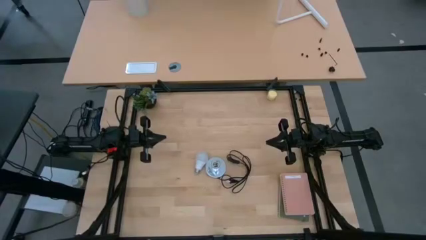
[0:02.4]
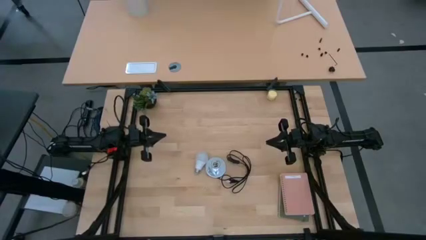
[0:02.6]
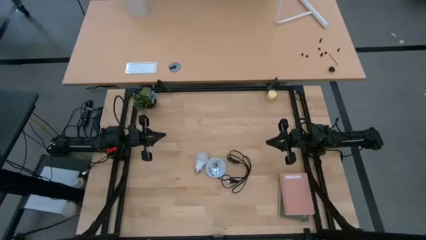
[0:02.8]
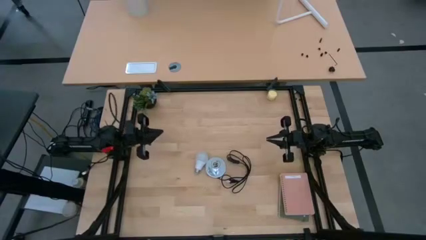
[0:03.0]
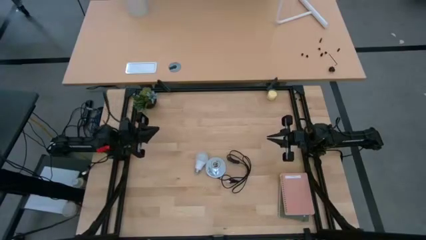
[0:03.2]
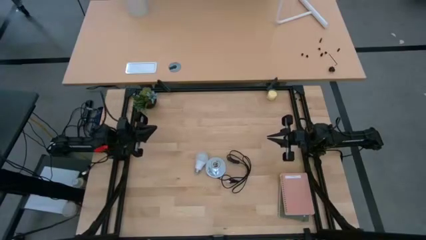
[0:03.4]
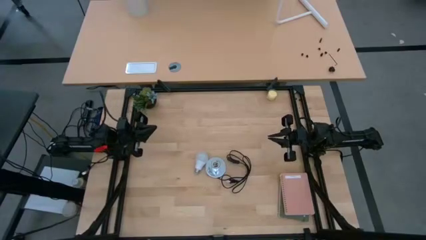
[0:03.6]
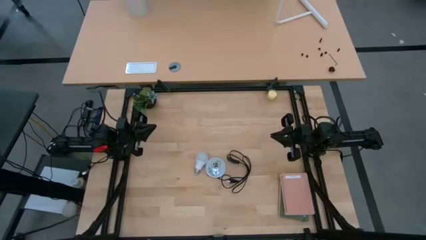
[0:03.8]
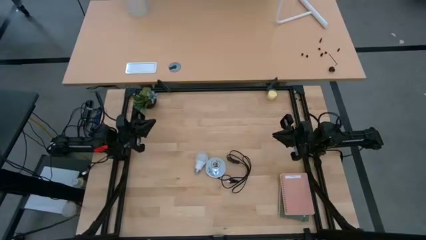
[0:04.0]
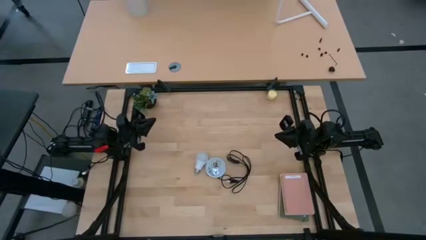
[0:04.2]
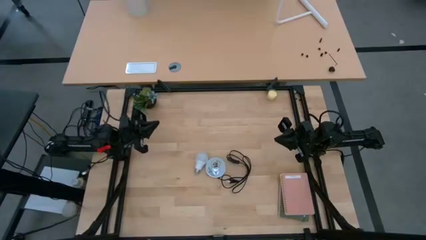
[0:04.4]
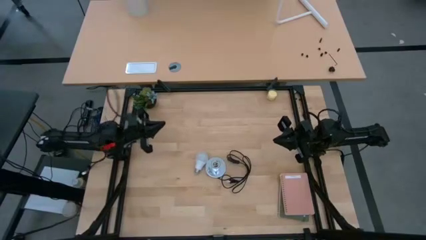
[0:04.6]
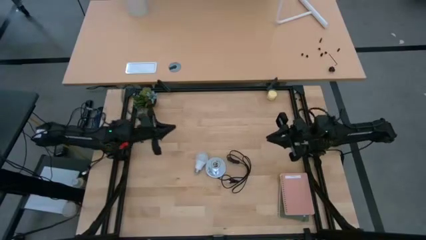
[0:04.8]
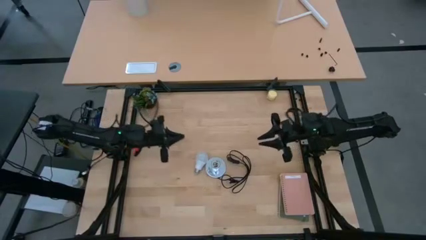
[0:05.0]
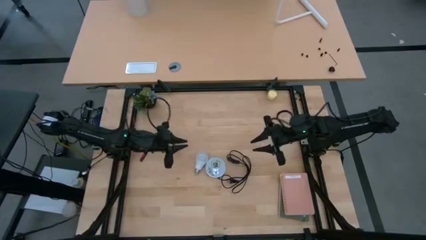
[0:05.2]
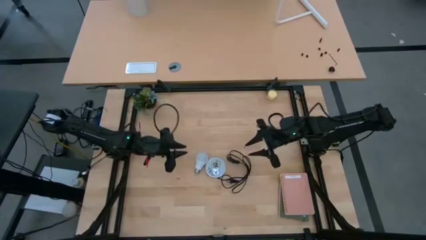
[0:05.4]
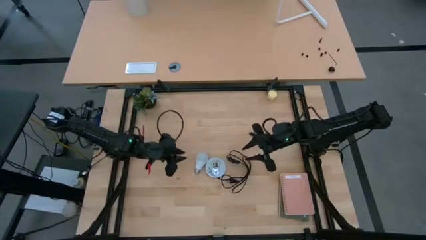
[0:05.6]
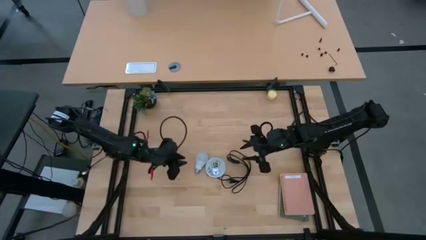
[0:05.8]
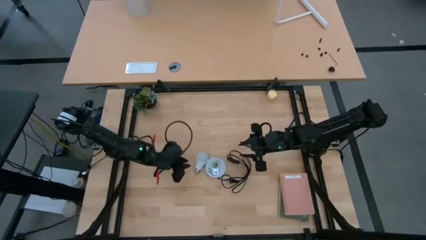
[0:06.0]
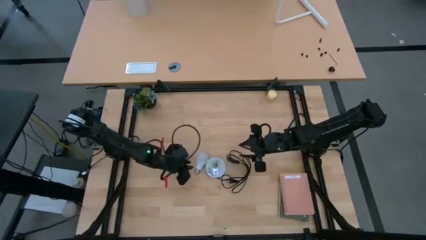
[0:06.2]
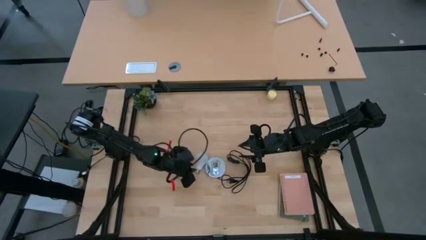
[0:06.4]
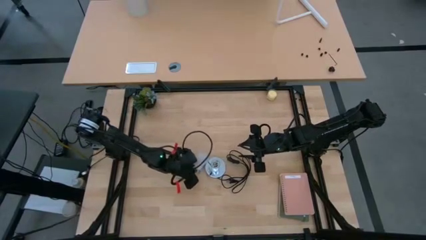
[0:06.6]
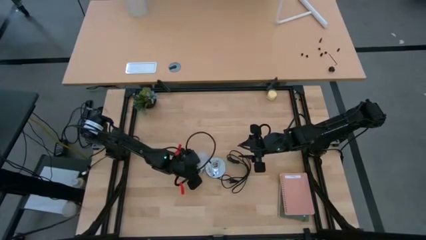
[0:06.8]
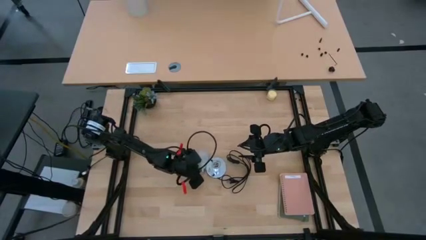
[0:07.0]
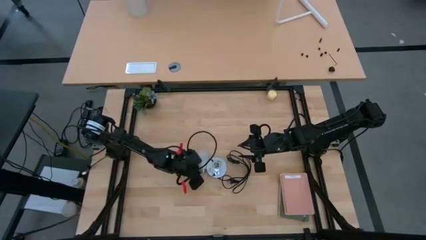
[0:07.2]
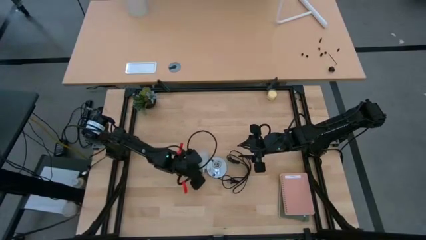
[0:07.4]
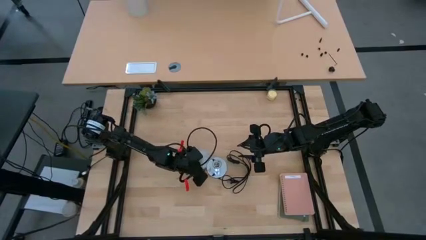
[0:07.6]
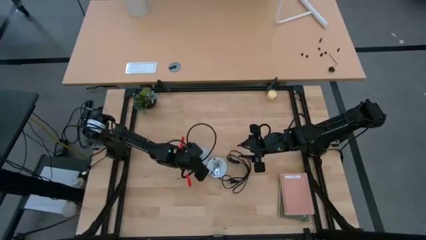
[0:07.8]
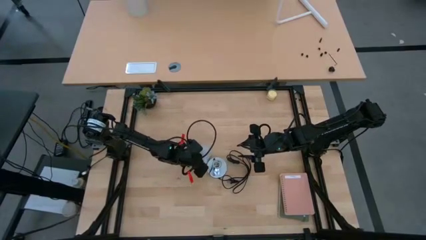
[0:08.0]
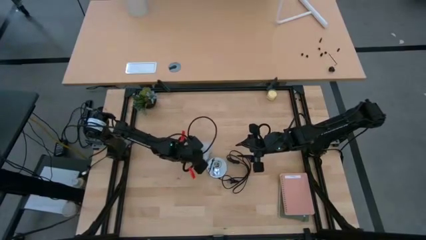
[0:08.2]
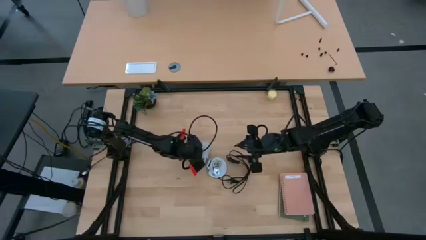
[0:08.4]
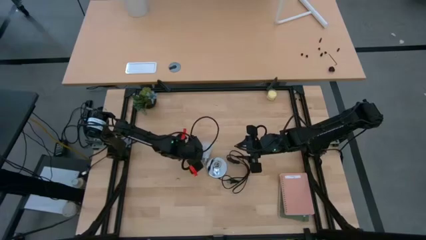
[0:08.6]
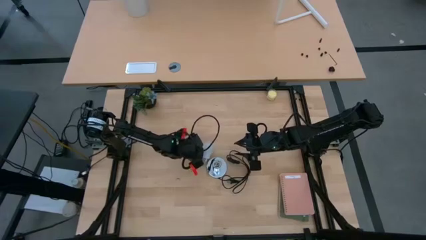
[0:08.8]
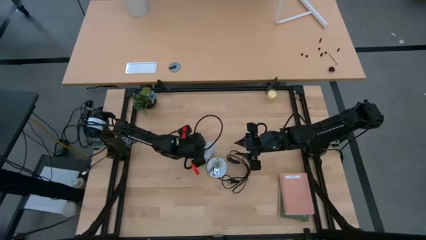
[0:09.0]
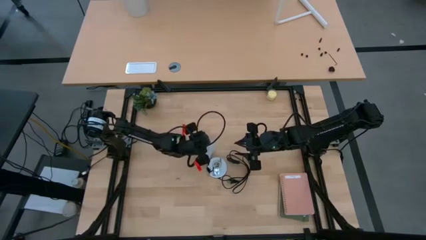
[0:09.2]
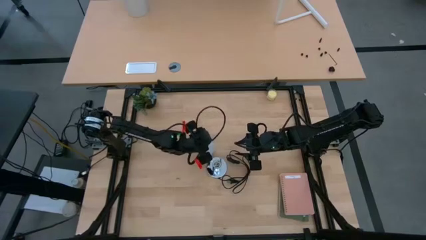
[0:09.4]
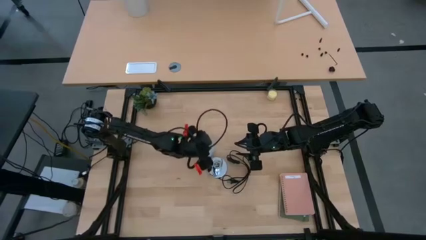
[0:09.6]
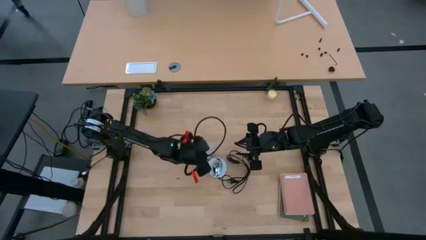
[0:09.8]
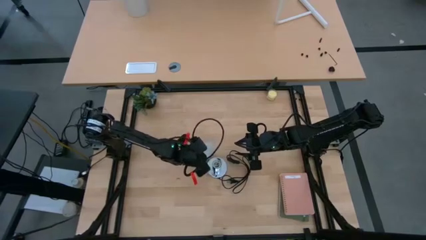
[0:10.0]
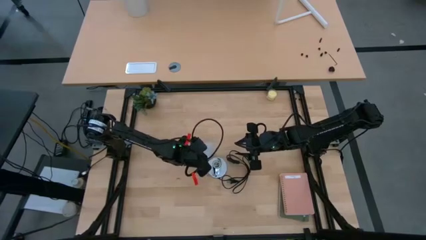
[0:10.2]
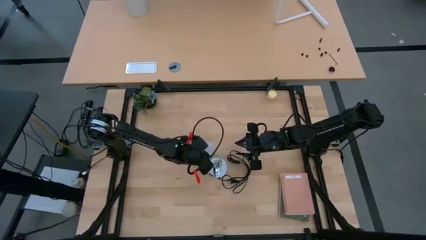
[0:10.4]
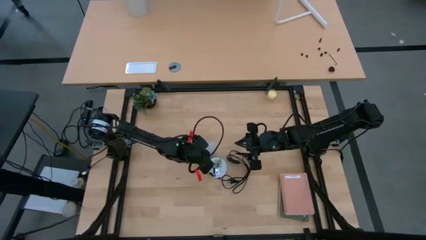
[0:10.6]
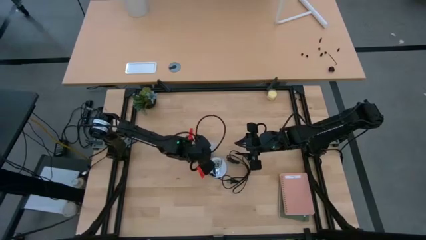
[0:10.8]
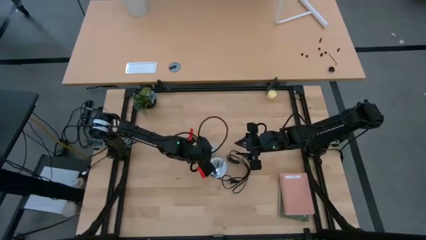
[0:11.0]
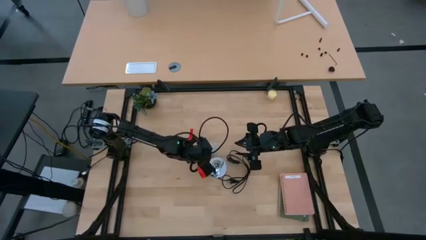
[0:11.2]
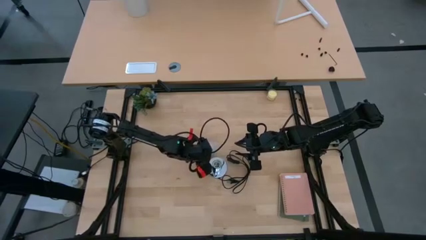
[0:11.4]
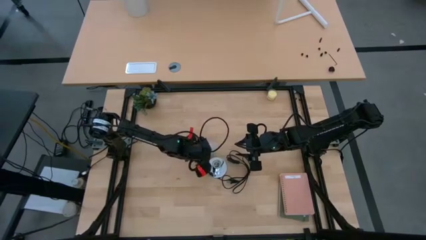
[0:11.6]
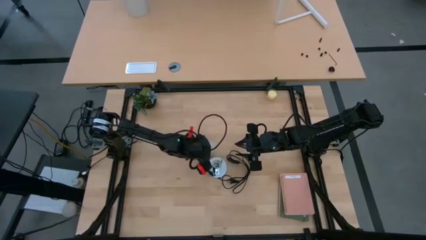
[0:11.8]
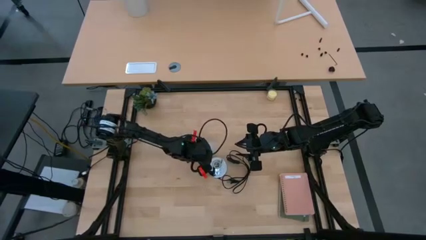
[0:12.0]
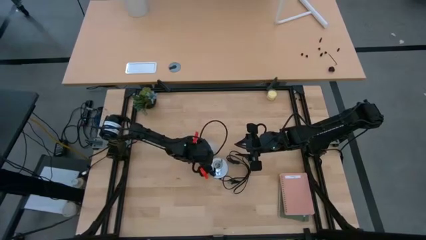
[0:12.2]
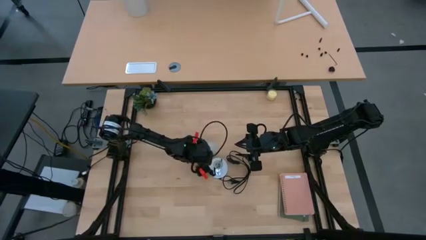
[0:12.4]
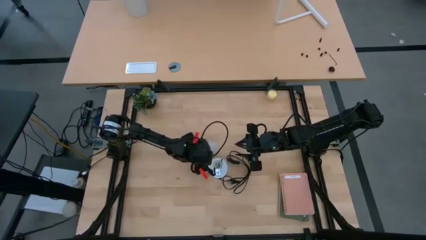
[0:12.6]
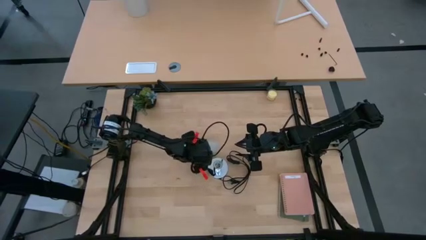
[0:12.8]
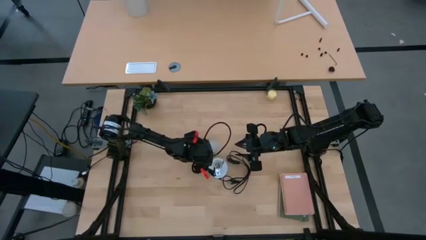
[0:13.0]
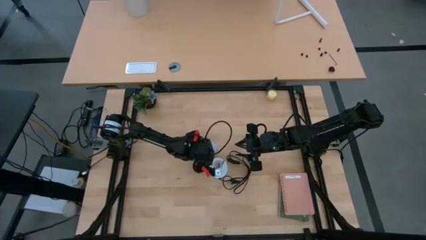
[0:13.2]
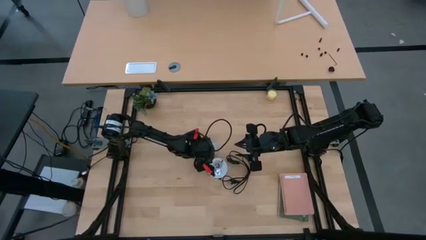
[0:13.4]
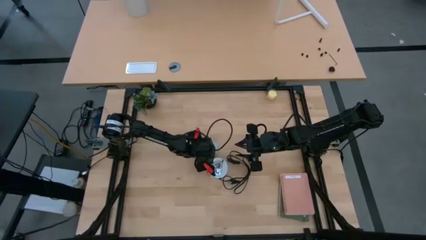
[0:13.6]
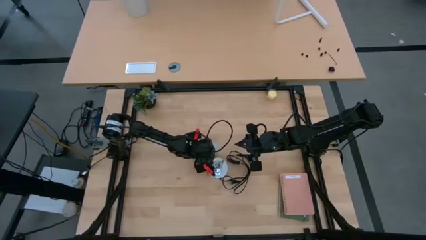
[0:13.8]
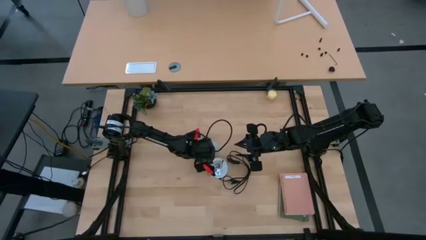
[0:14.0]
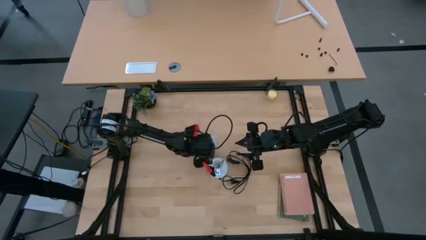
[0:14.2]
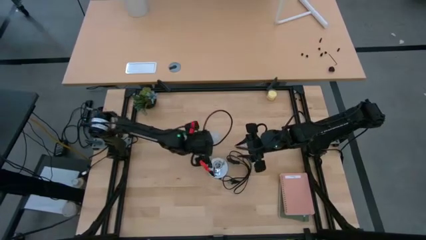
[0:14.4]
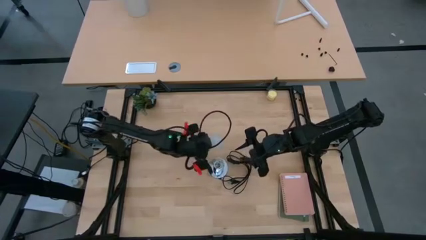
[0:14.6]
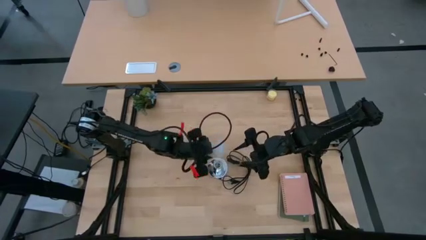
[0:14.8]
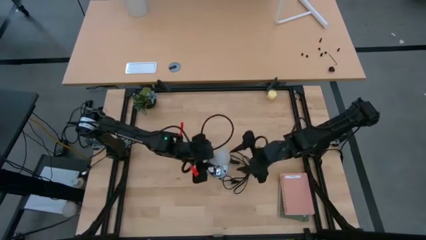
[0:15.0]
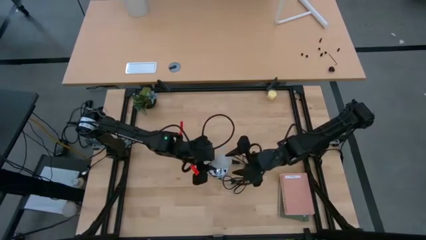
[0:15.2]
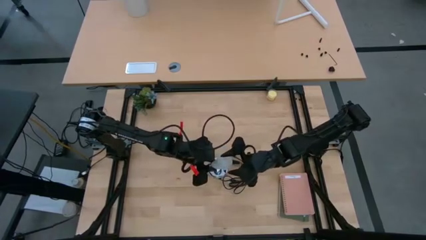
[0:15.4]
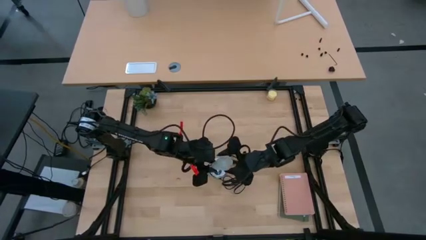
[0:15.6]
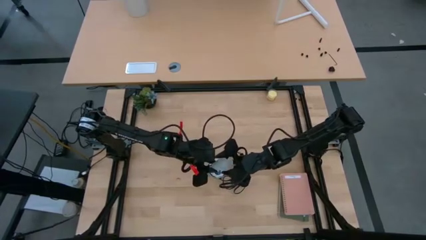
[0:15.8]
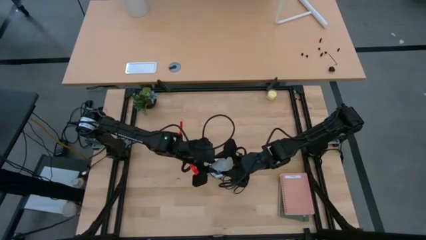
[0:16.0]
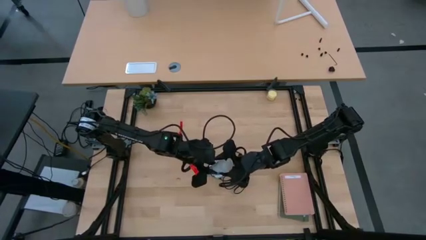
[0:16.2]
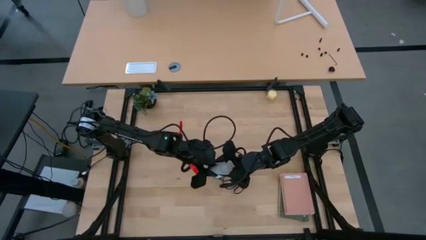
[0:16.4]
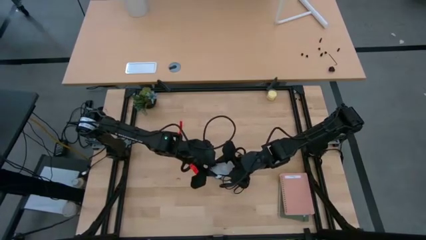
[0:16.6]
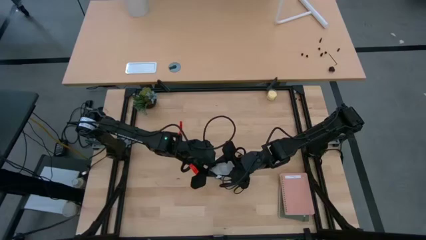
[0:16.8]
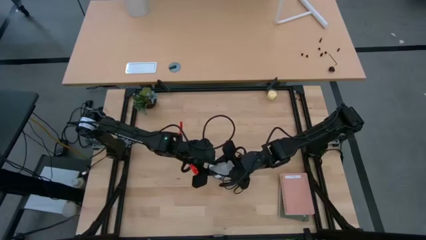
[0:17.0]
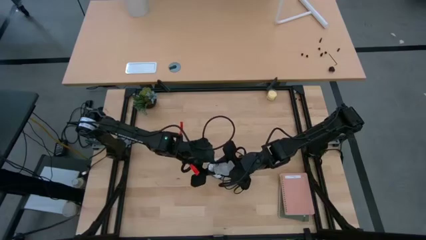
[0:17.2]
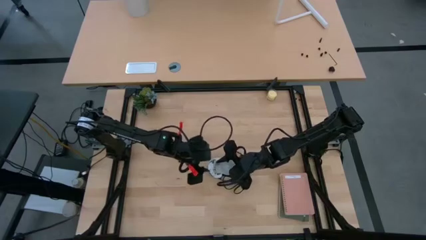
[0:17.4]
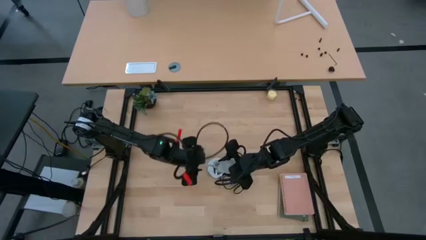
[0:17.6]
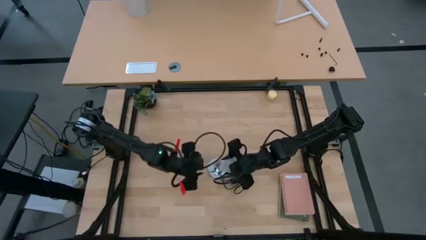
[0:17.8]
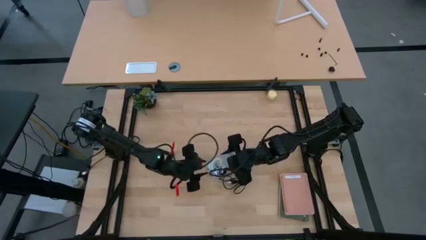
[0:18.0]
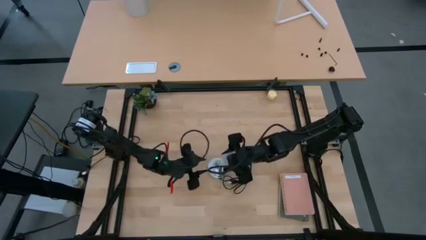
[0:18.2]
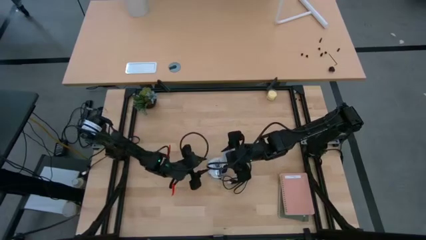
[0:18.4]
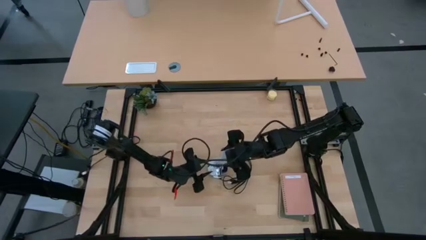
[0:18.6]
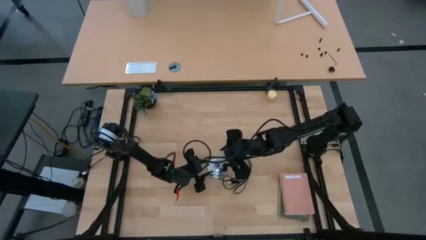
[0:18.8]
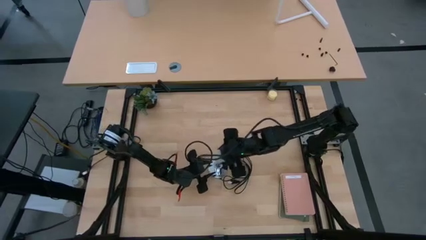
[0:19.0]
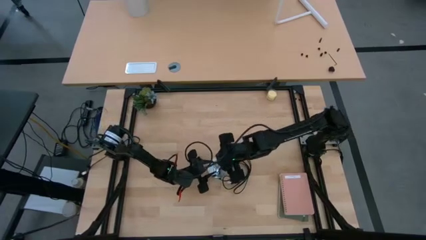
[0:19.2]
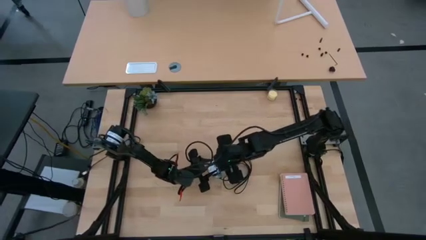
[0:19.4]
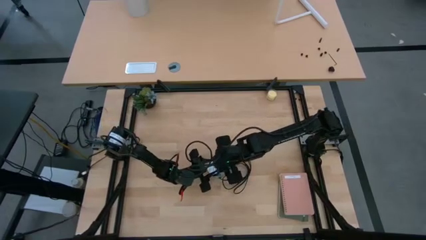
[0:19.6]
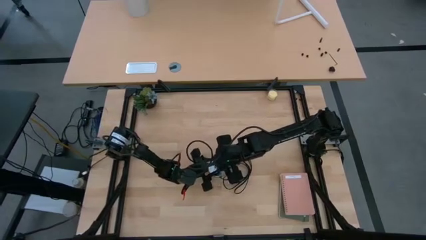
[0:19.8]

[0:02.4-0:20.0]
Task: Screw lightbulb
Insert the white lightbulb into the silver lamp
